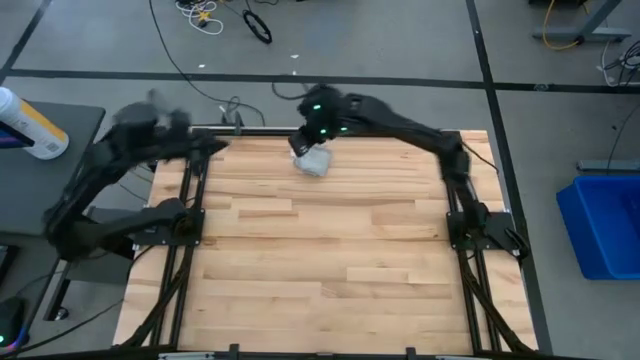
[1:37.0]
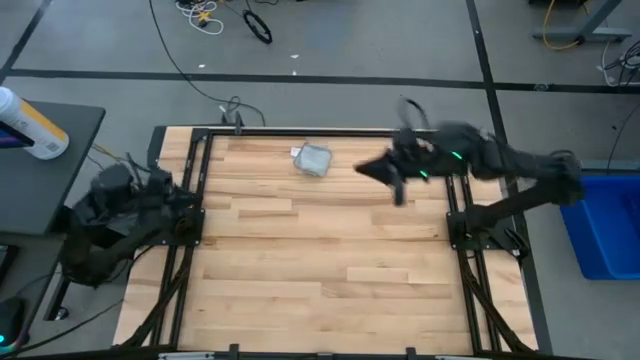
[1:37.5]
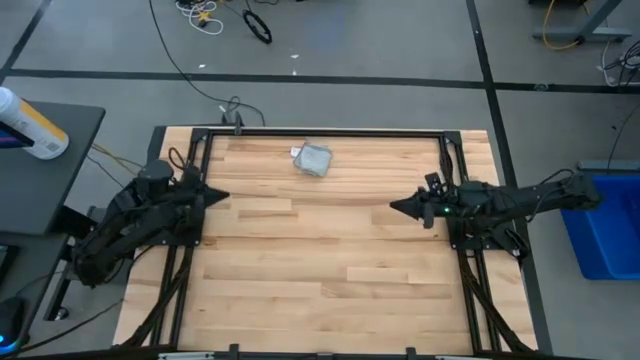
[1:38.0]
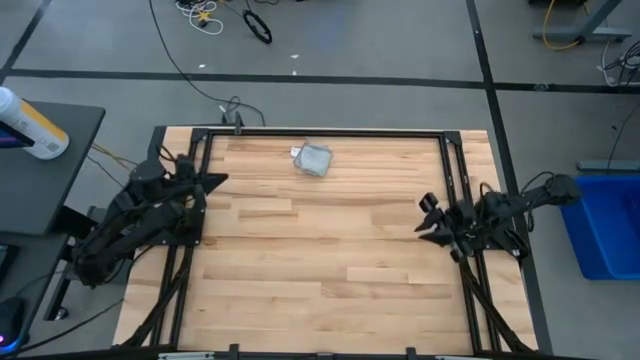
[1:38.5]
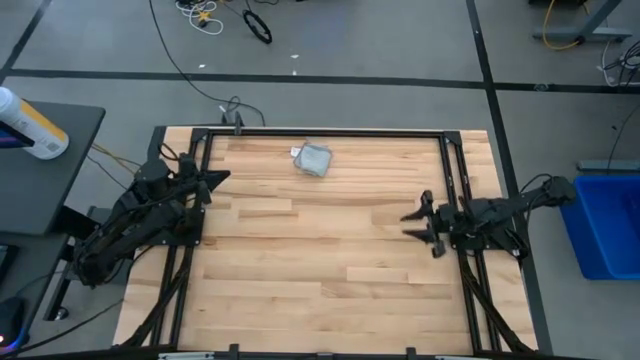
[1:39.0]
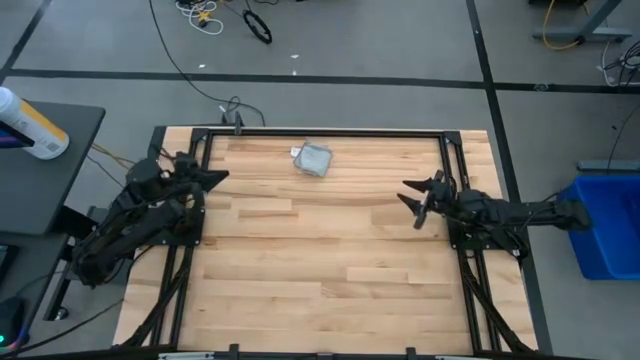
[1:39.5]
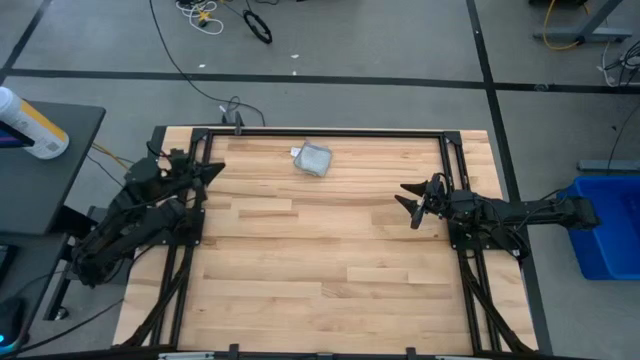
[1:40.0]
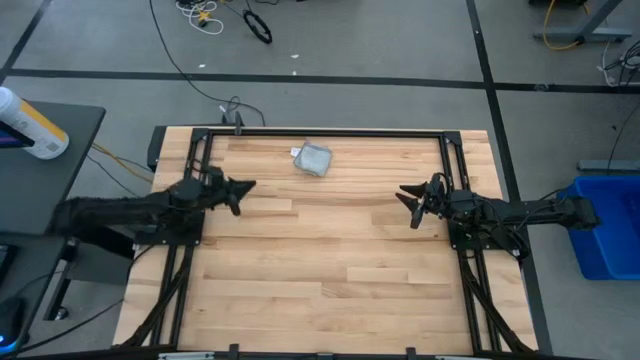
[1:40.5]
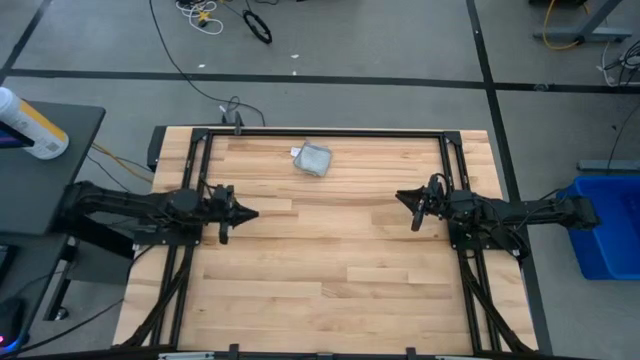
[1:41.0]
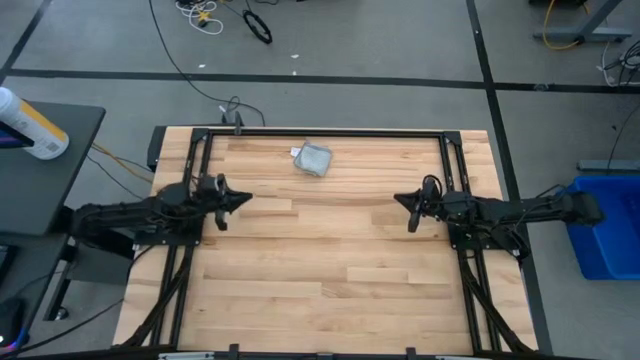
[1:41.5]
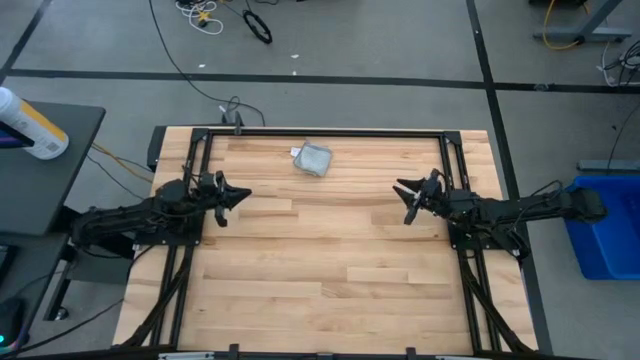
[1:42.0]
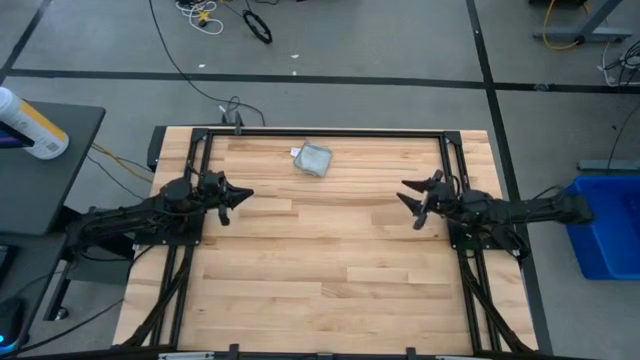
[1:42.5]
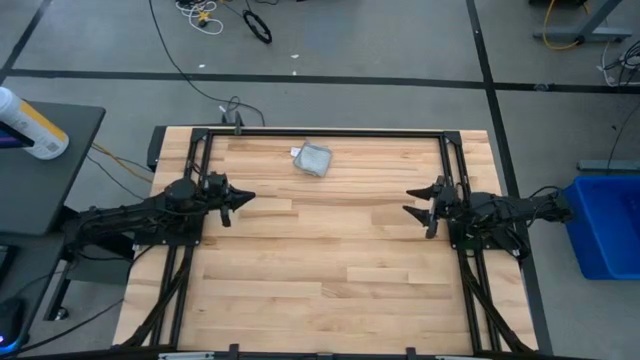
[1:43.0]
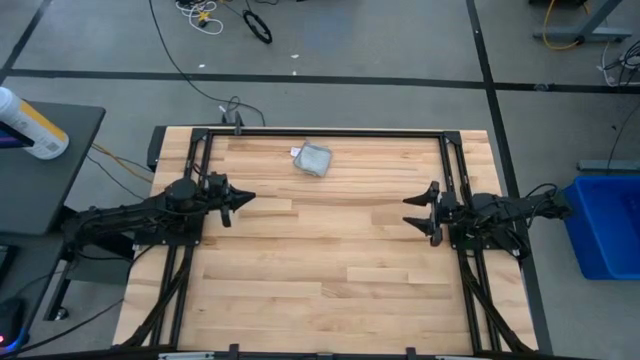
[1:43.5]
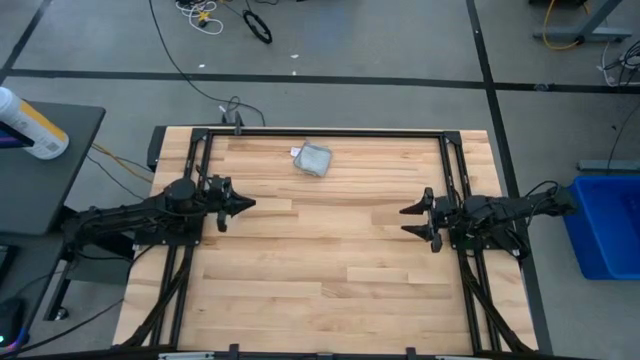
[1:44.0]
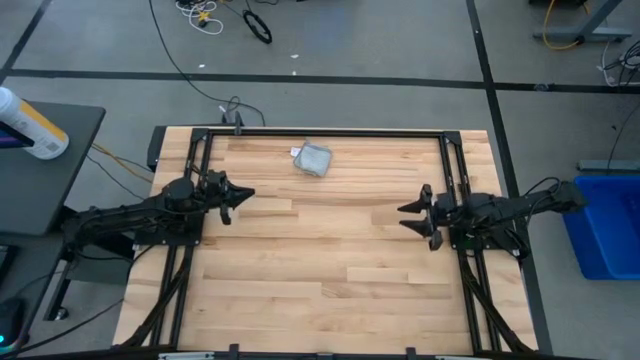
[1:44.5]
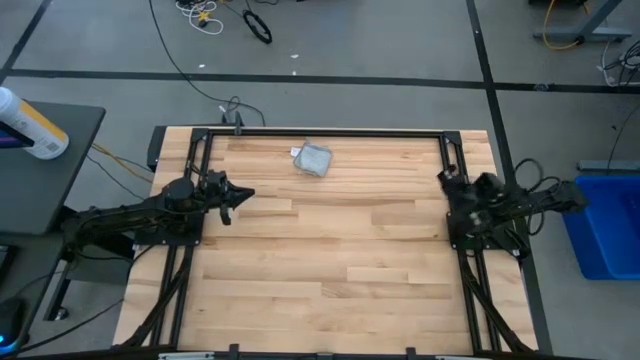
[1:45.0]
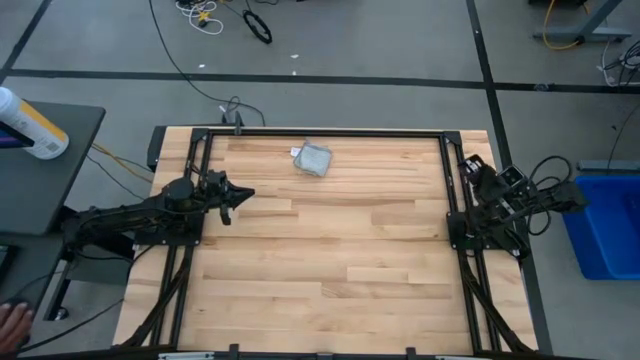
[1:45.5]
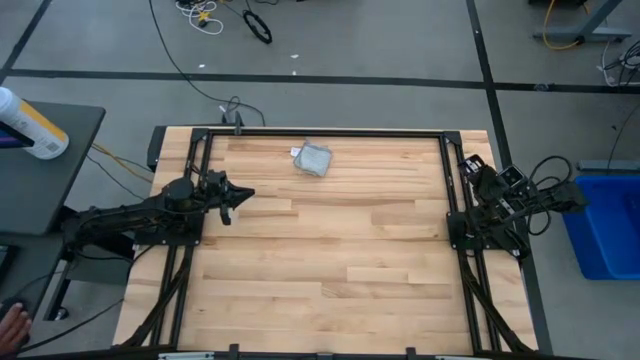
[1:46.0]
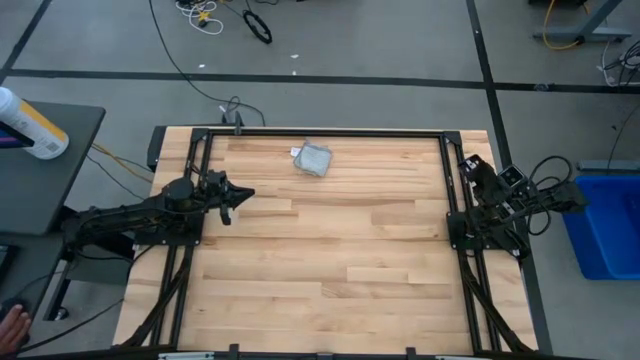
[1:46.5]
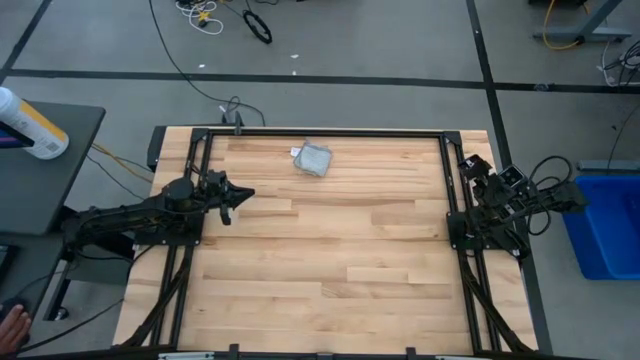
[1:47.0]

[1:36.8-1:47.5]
Task: Fold microfiber towels
Return to Home Position

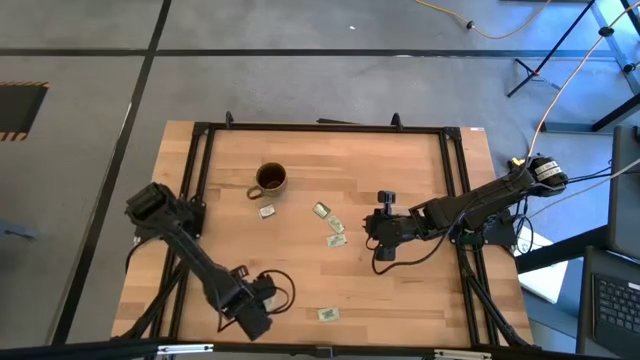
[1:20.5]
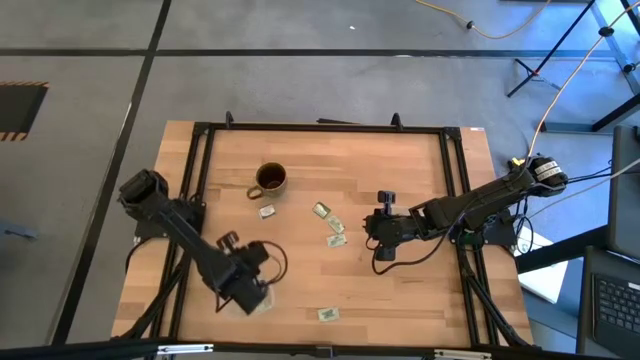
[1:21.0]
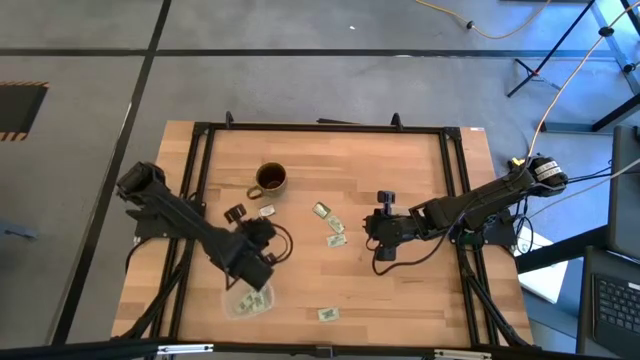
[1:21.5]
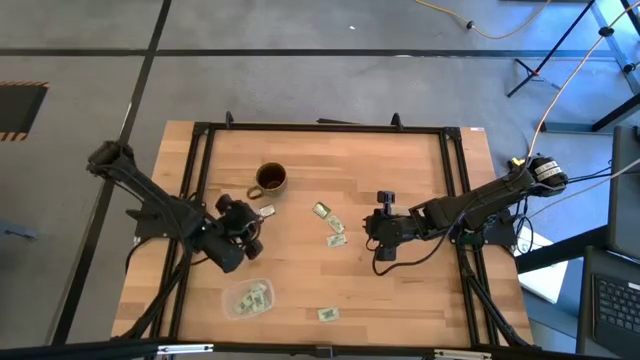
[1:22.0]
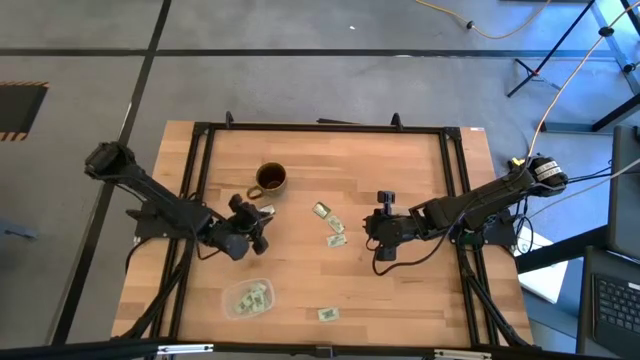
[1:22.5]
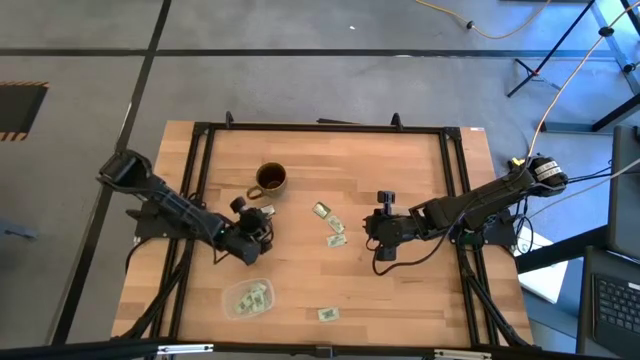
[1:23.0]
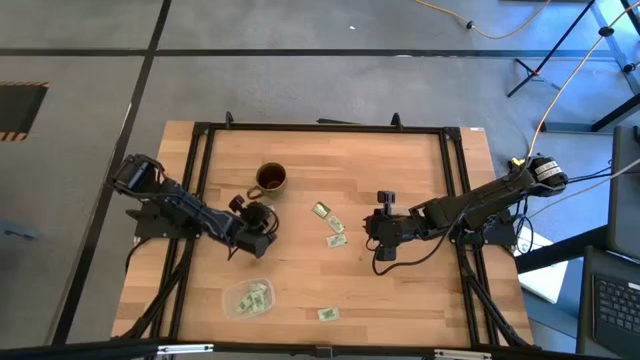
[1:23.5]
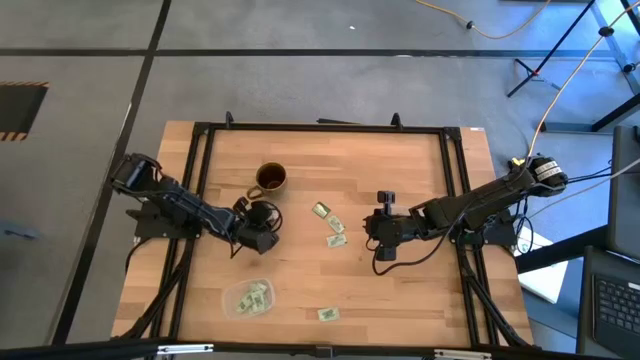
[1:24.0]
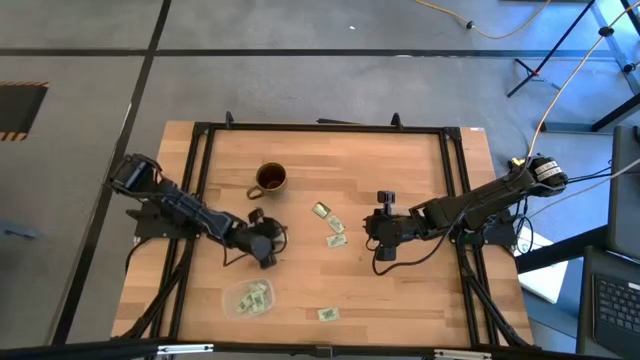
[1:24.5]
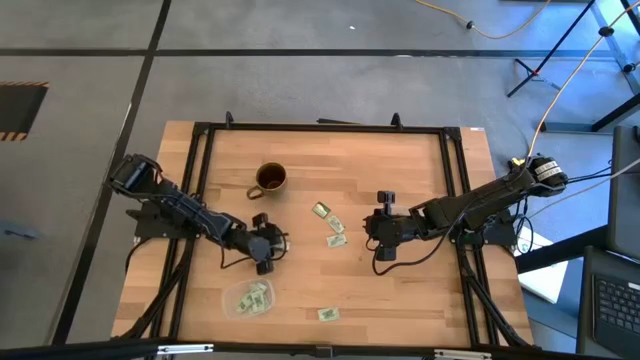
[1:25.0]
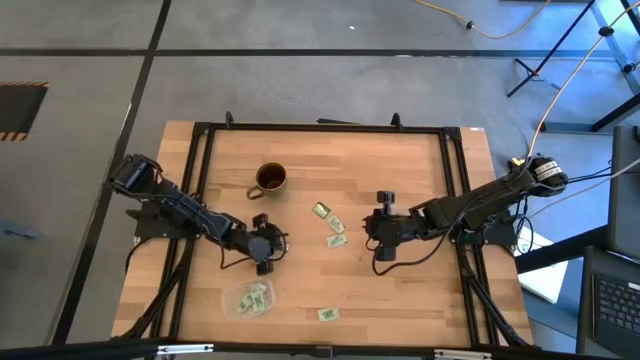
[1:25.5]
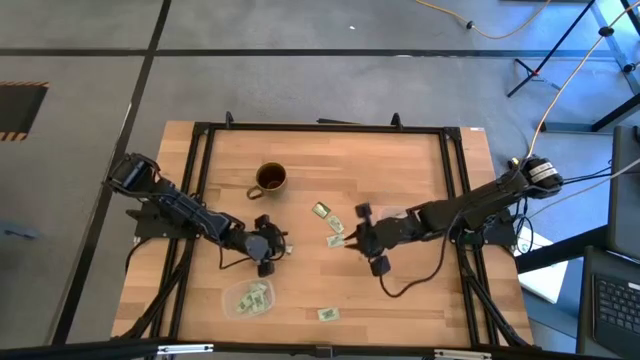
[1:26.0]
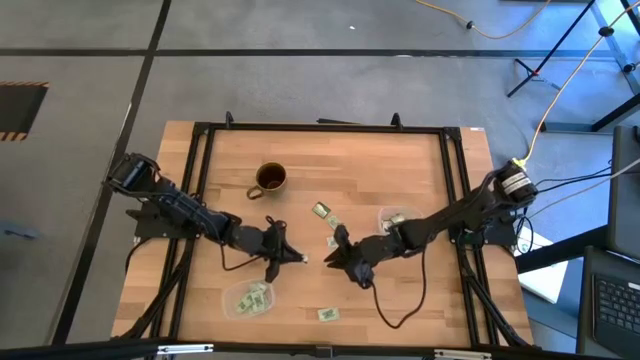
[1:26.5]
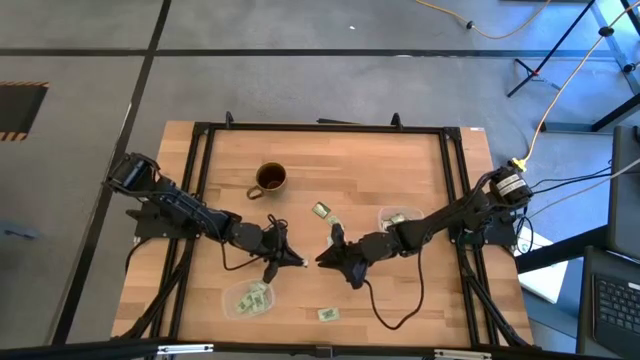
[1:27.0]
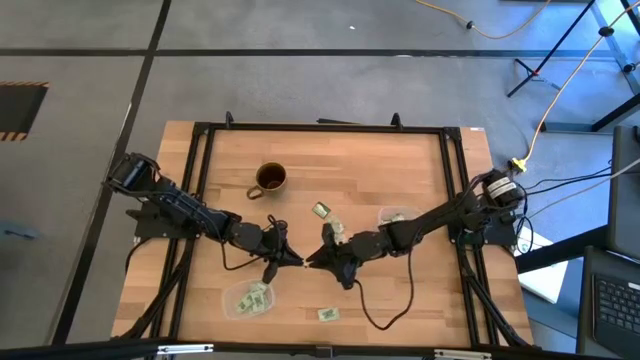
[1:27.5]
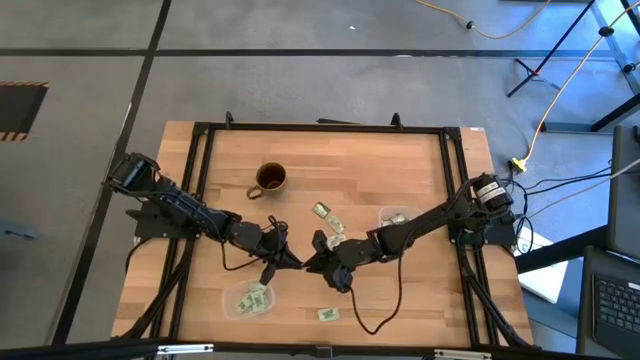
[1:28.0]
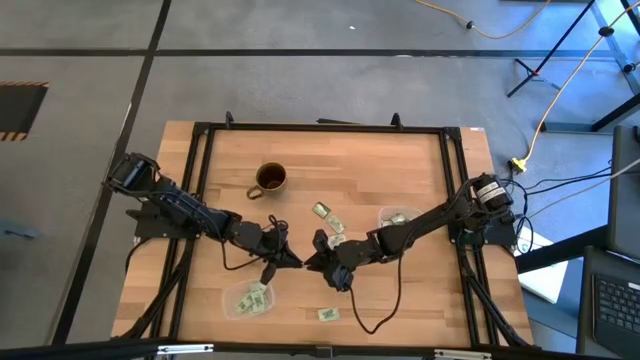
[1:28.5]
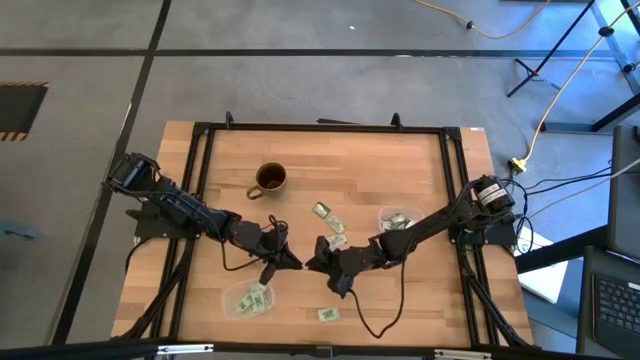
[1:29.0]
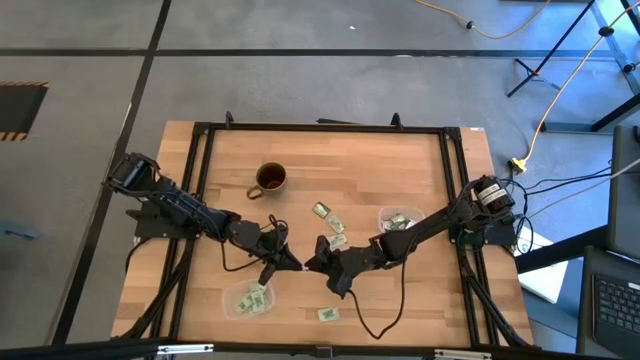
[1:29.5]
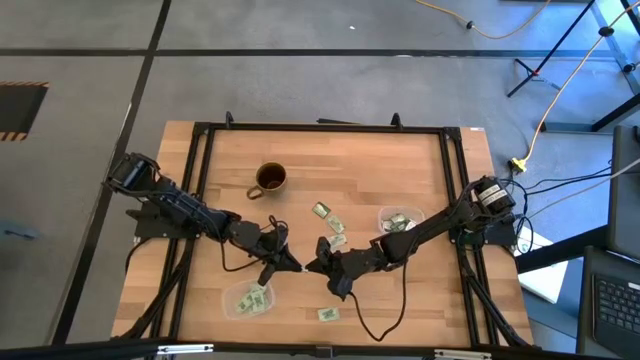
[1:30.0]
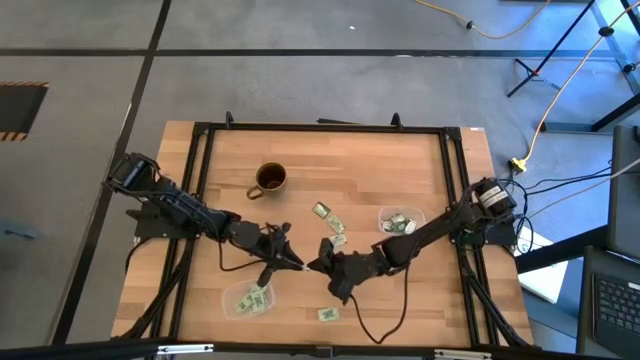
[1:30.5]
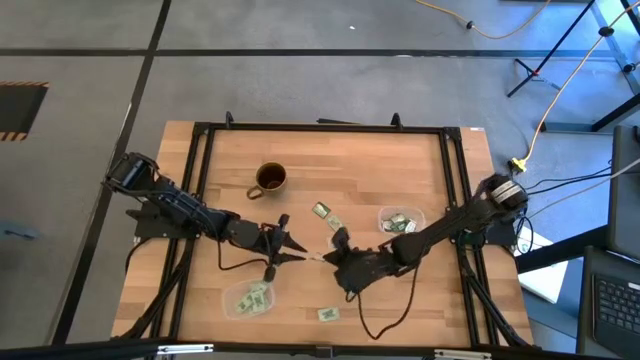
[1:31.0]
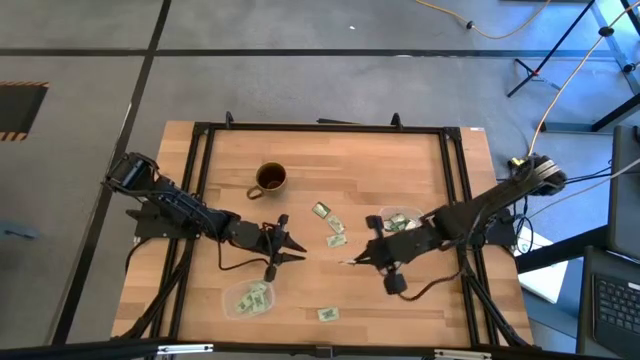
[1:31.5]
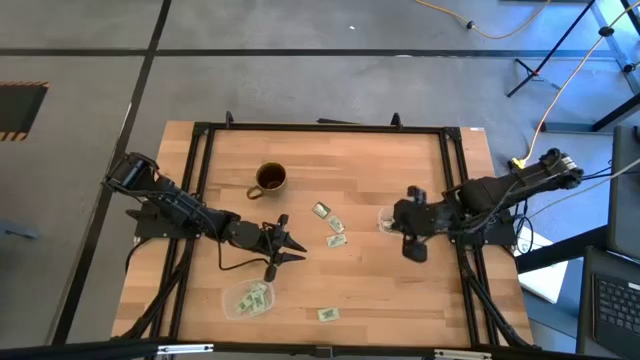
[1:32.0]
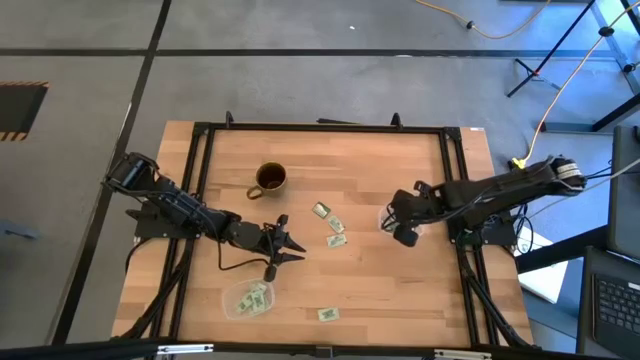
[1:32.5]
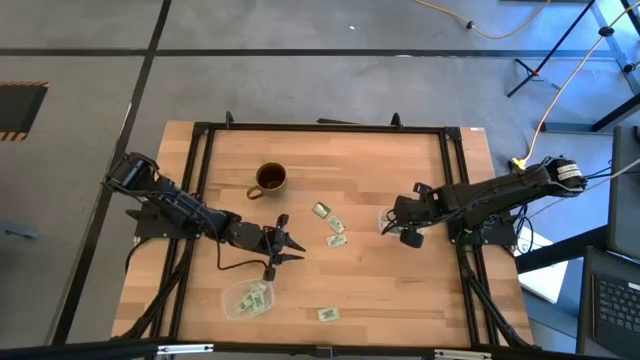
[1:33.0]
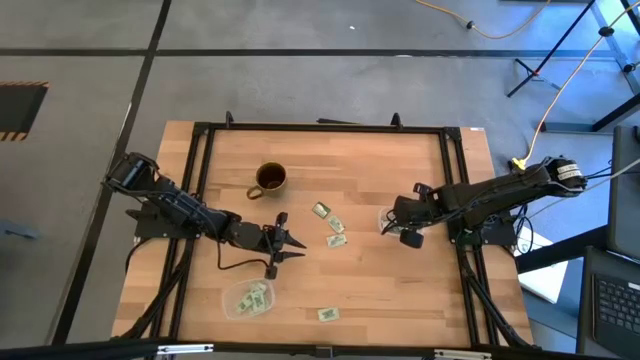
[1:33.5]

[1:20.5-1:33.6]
Task: Pick and place Stevia / Truvia into bins
Put the truvia packet into the top transparent container
